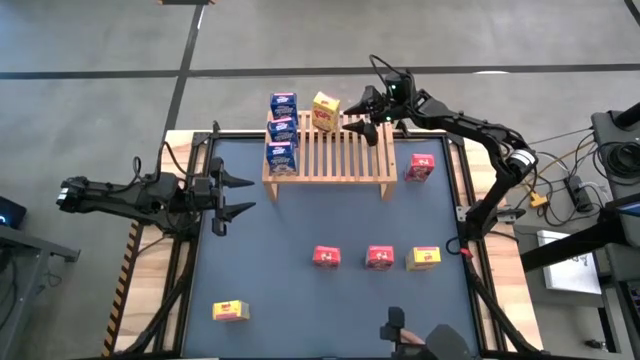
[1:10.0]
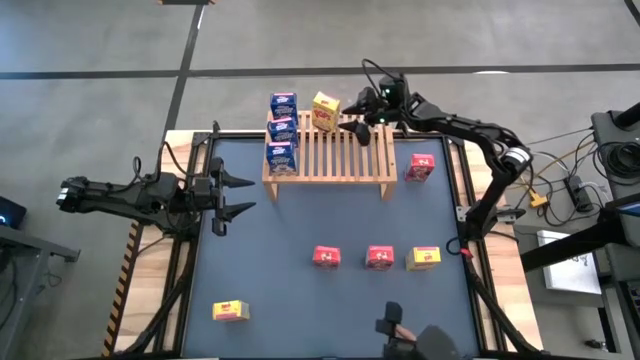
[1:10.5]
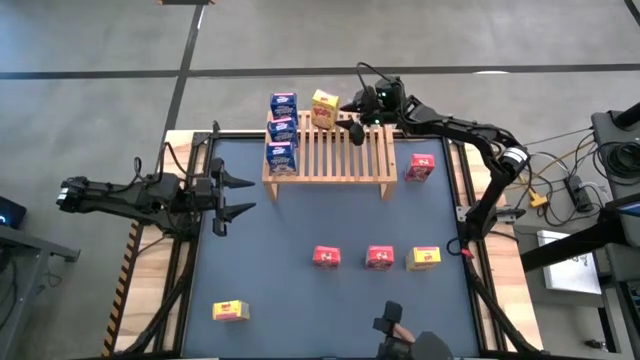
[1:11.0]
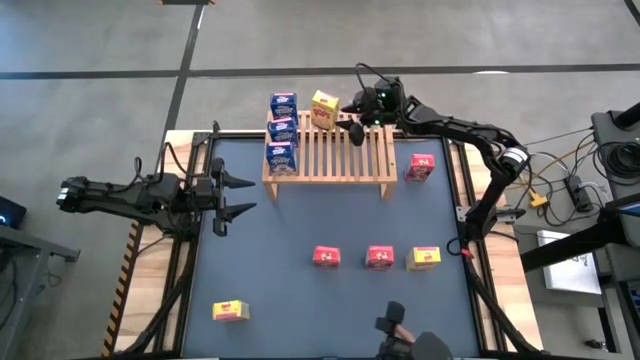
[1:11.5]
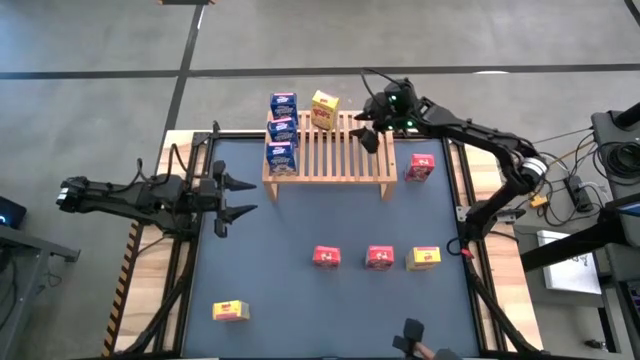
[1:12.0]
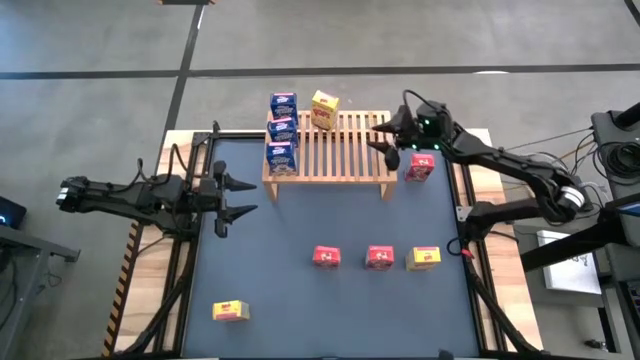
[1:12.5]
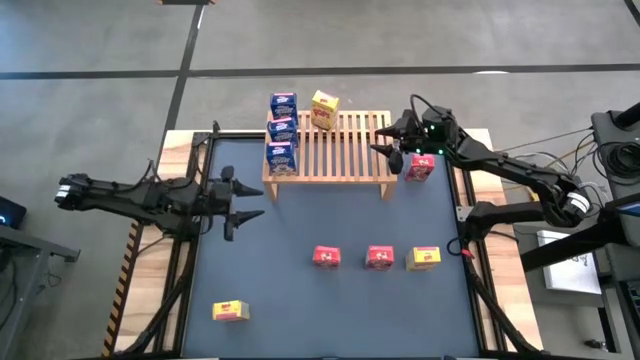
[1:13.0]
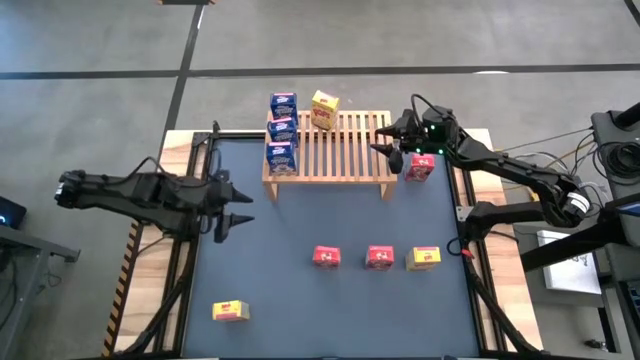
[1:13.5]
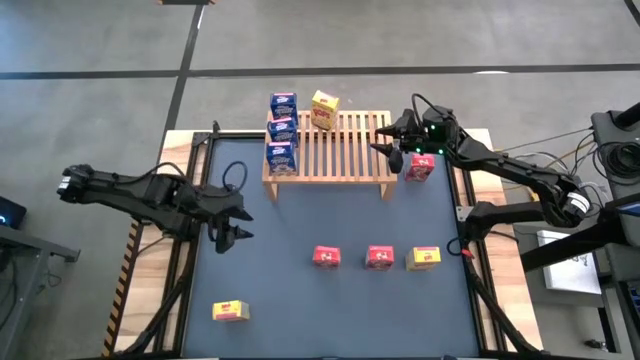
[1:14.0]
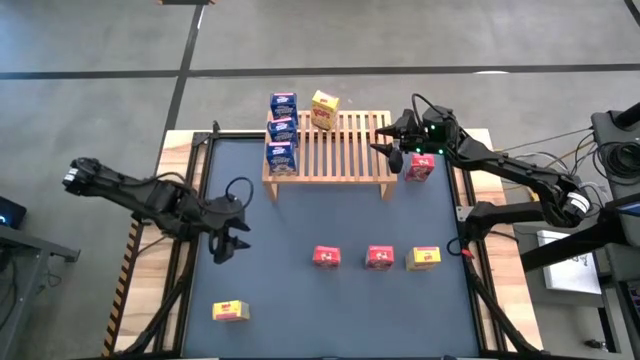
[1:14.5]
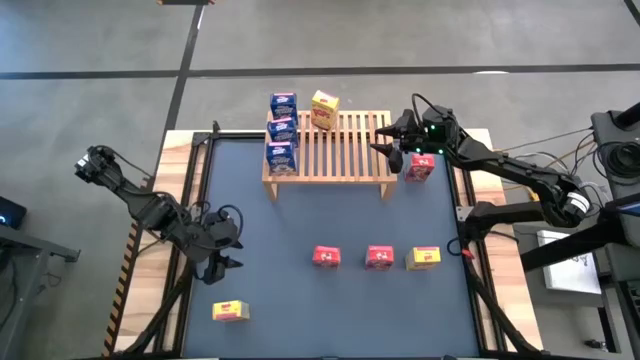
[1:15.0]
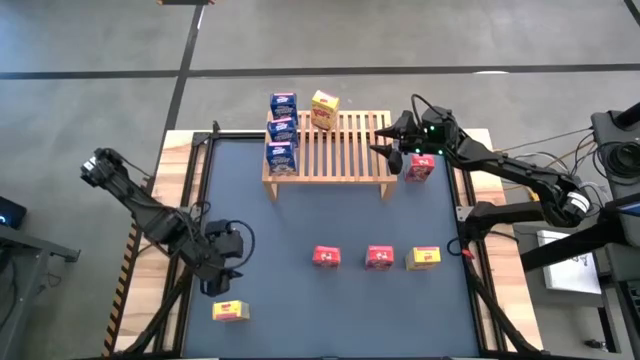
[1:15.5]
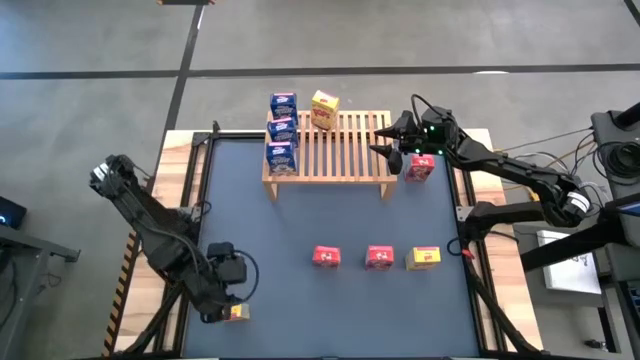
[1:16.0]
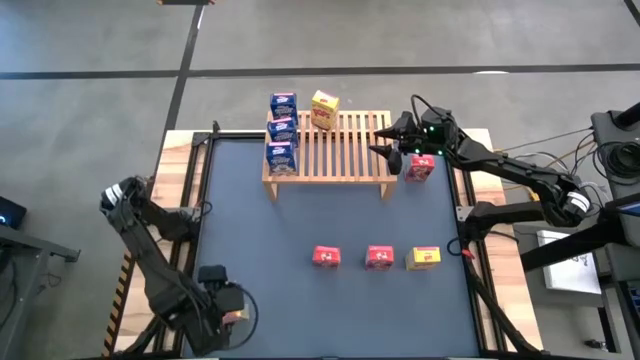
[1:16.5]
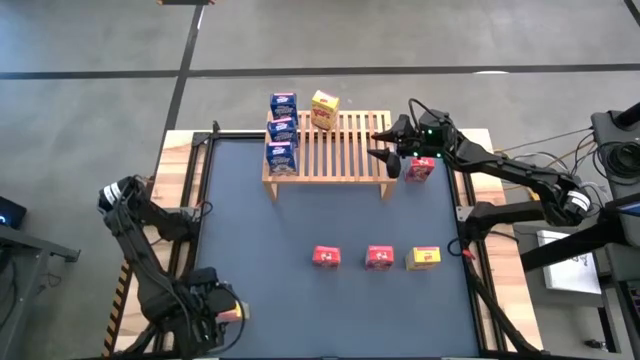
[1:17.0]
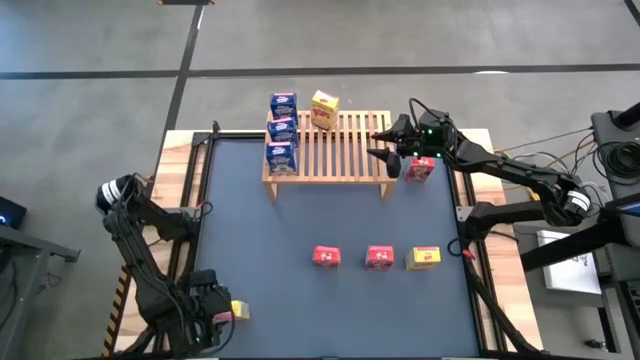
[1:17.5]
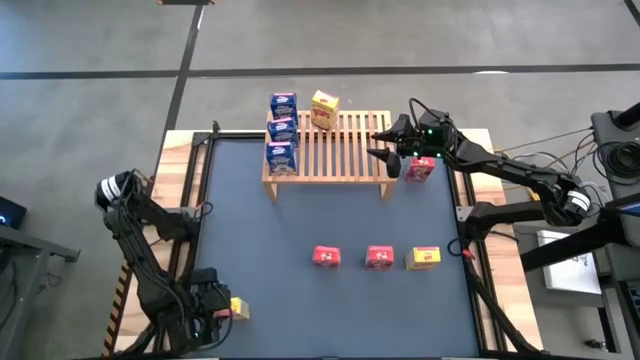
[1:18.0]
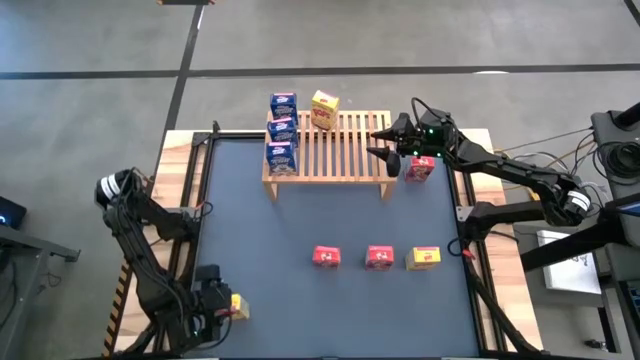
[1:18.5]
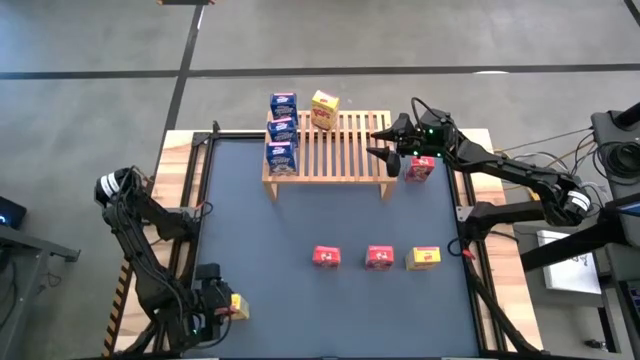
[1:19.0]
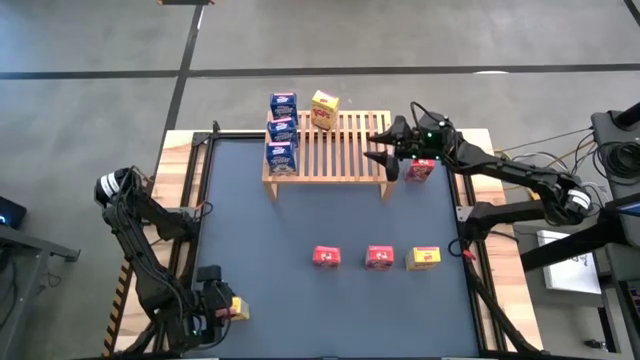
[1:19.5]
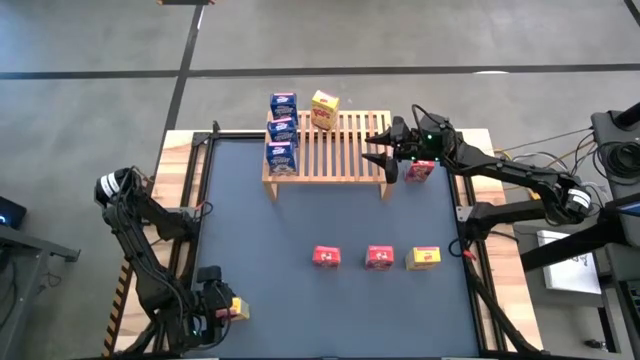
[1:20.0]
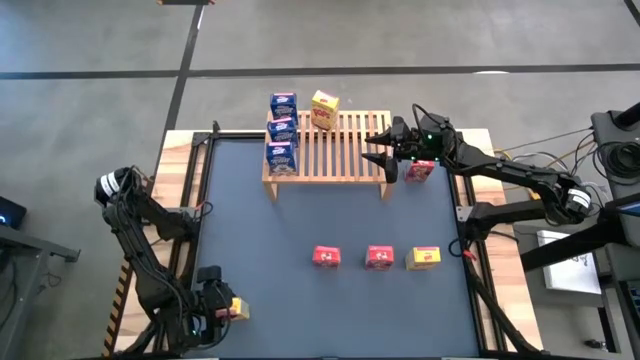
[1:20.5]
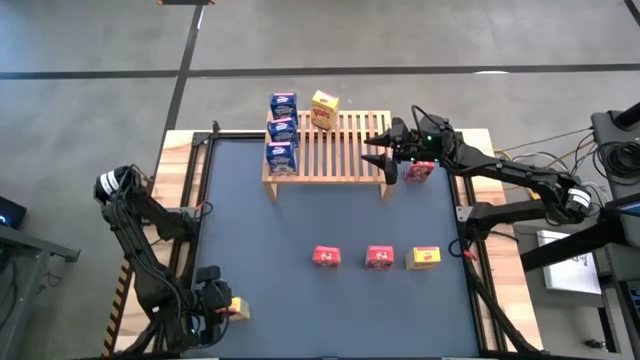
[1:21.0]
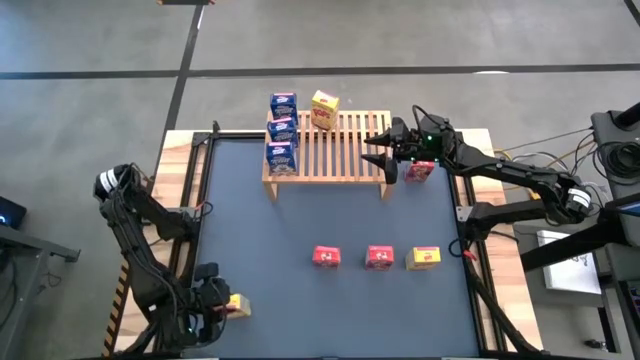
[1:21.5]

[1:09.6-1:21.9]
Task: Stack cereal on shelf
Put the bottom yellow cereal box on the shelf aligned with the other yellow cereal box

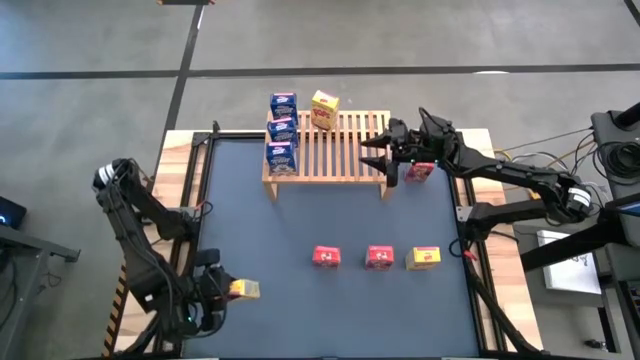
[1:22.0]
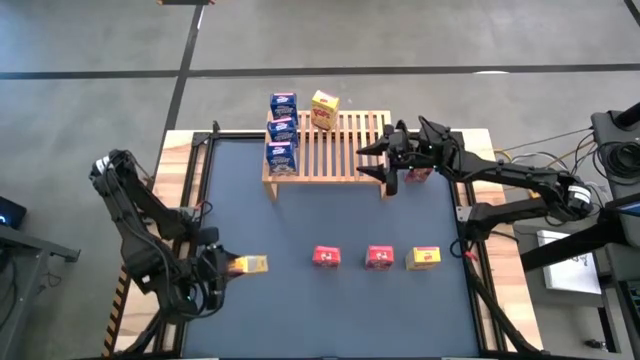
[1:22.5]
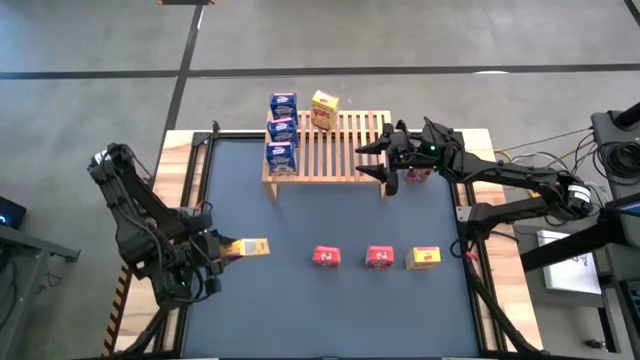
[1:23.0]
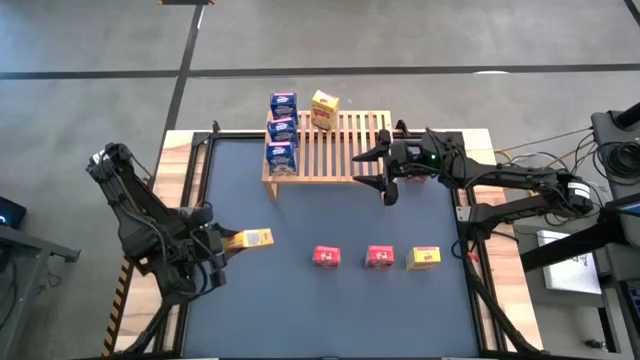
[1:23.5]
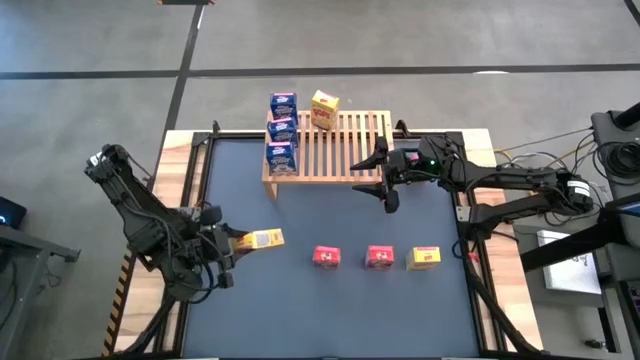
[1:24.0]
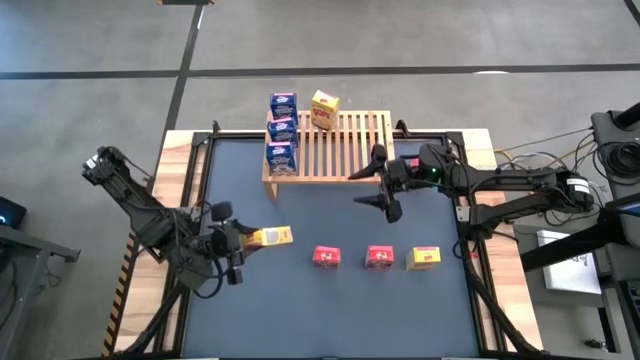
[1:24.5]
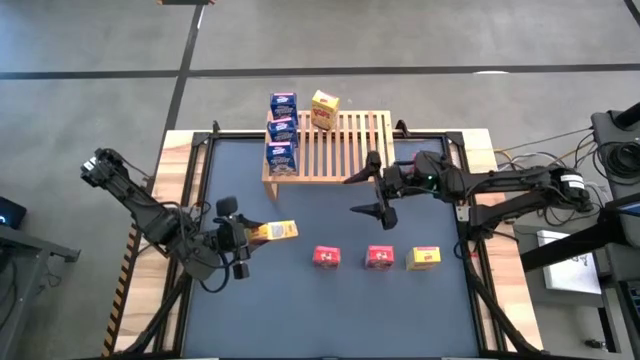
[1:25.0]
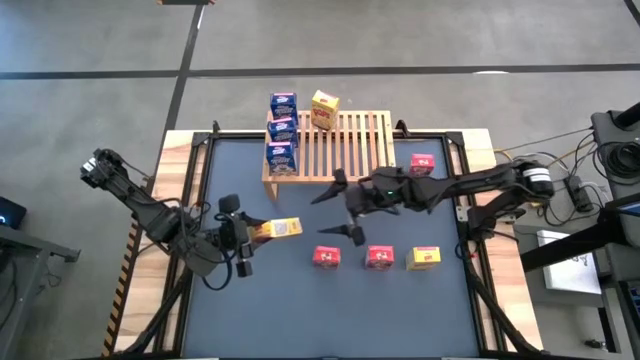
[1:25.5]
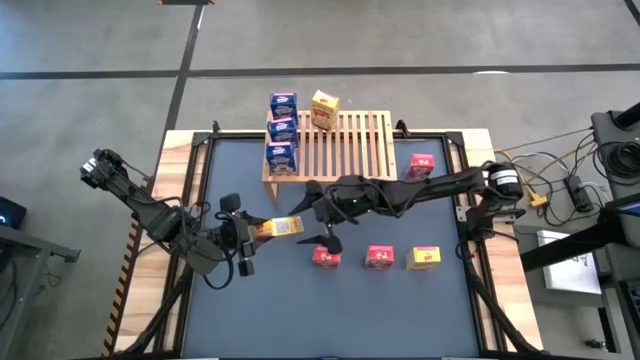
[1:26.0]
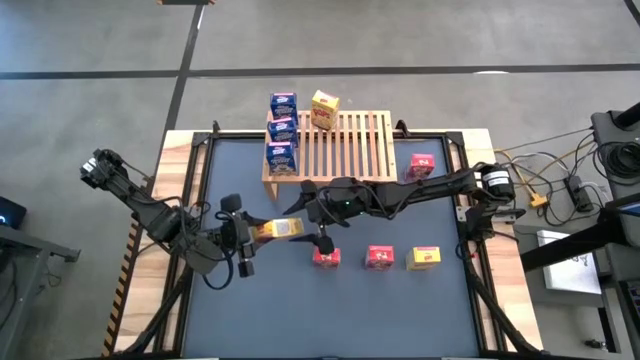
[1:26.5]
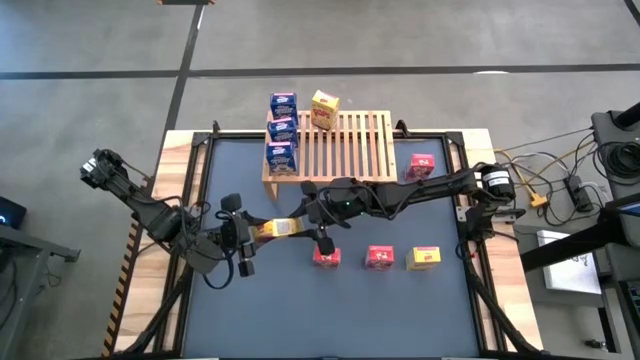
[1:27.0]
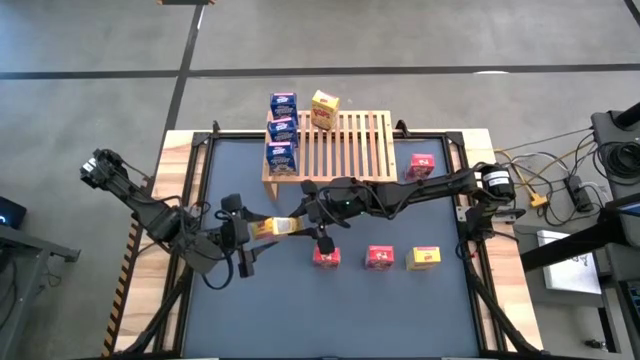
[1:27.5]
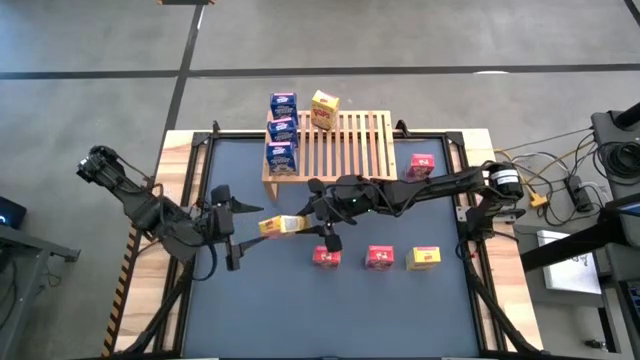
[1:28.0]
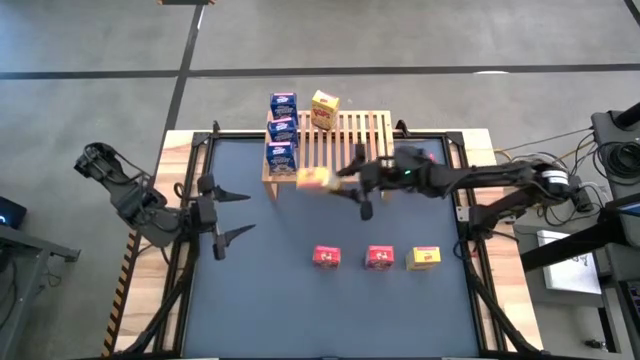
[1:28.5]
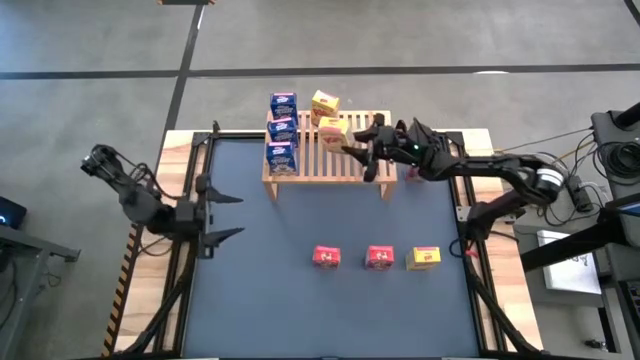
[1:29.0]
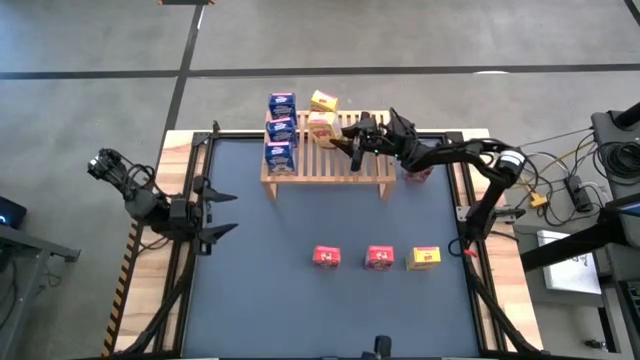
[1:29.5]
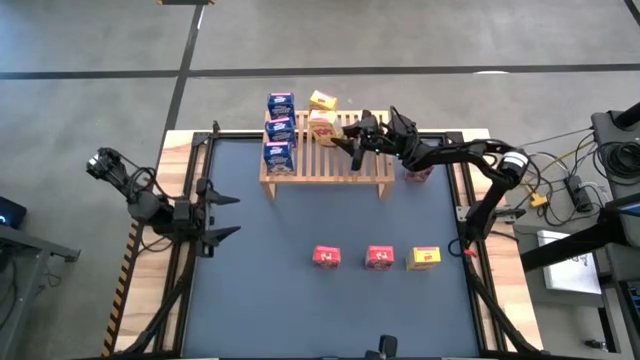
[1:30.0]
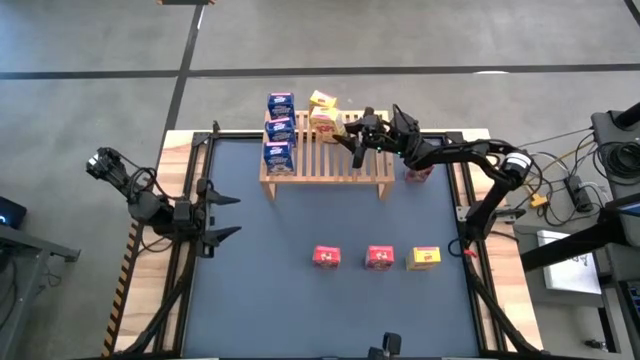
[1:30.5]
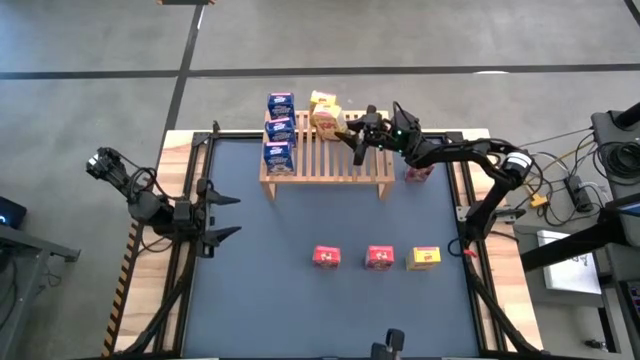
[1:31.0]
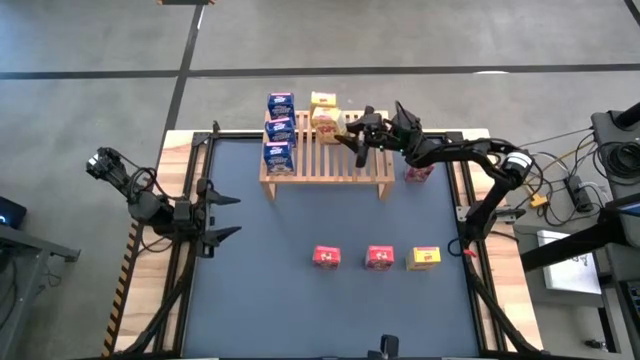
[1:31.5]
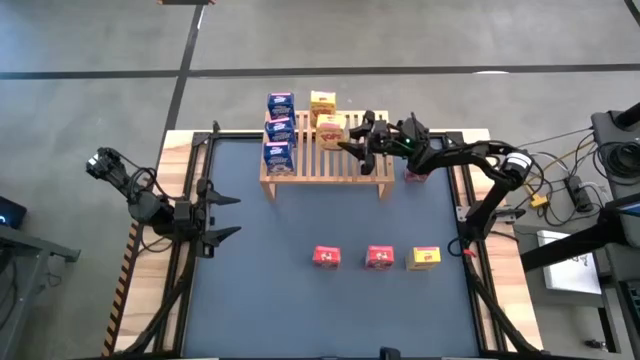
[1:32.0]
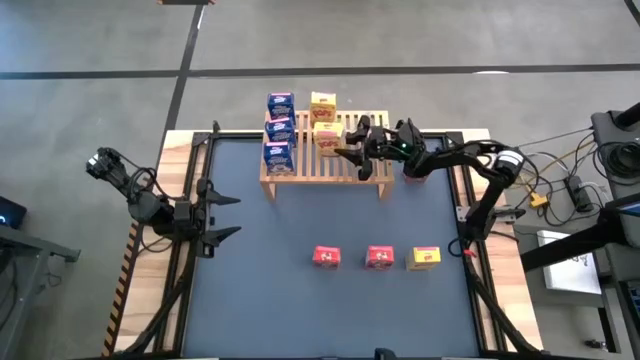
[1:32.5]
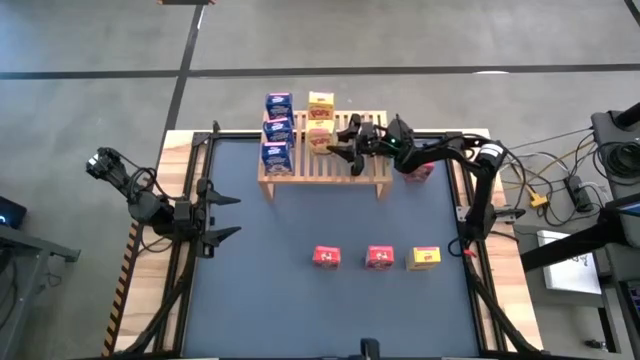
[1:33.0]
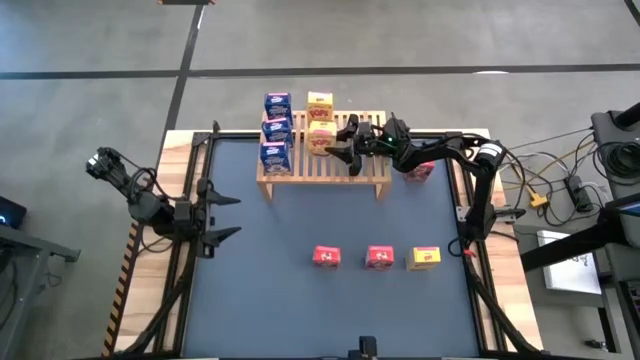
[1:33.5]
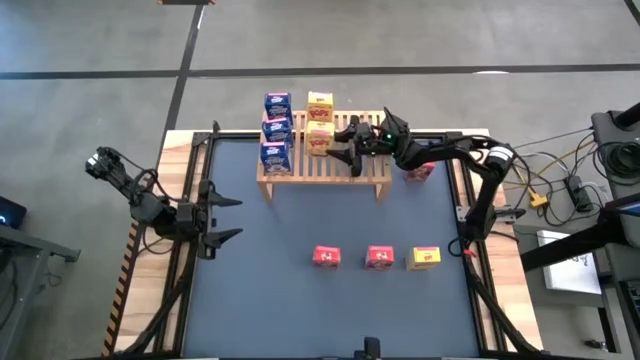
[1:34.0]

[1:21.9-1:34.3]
Put the bottom yellow cereal box on the shelf aligned with the other yellow cereal box
